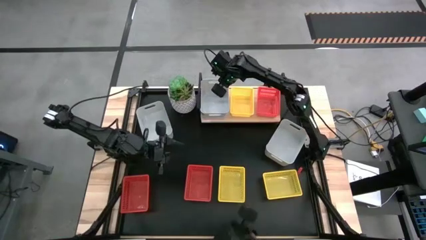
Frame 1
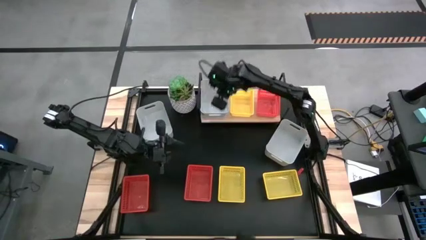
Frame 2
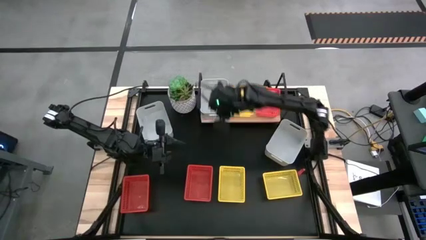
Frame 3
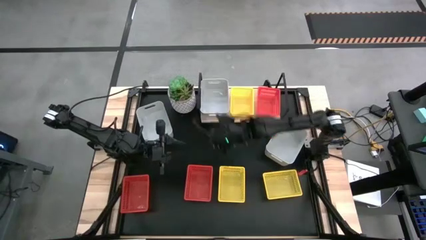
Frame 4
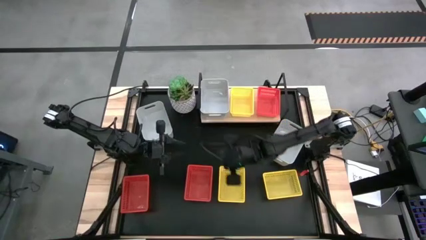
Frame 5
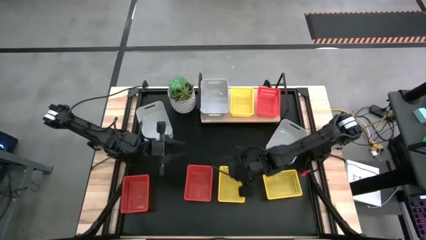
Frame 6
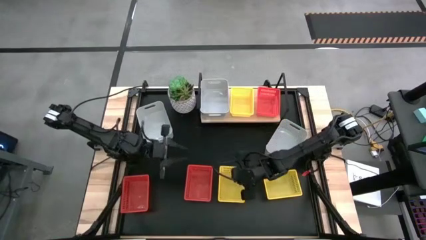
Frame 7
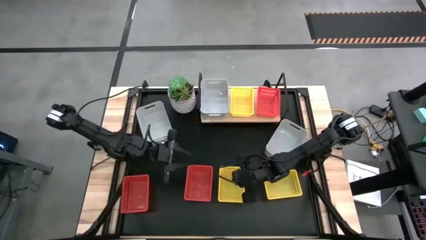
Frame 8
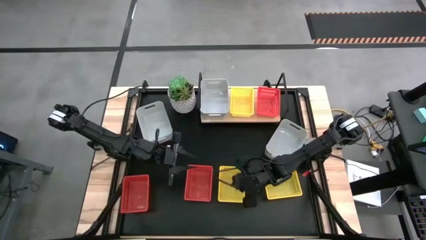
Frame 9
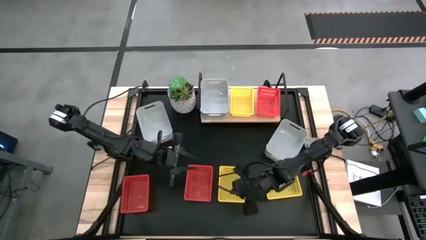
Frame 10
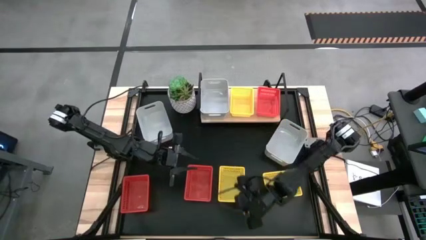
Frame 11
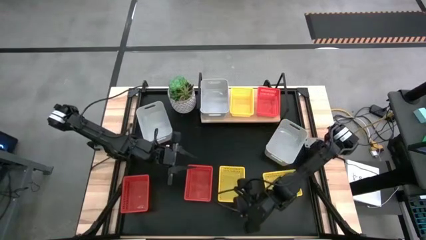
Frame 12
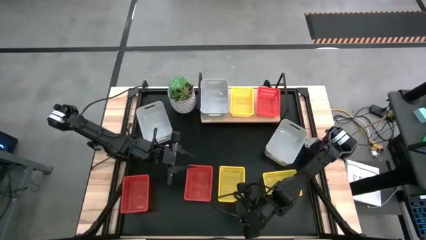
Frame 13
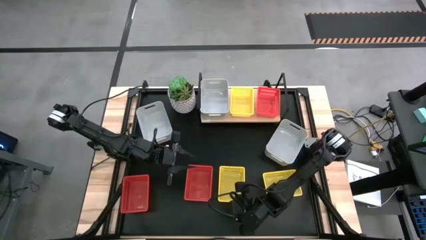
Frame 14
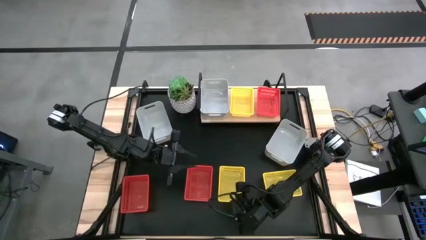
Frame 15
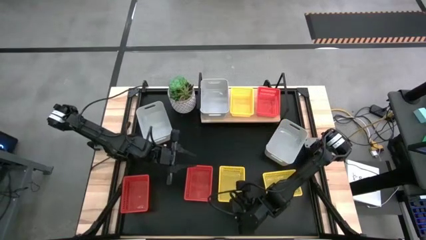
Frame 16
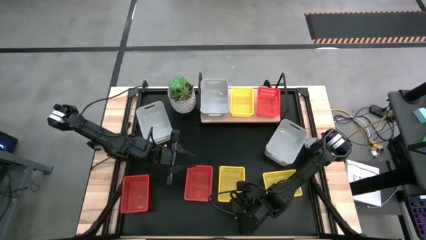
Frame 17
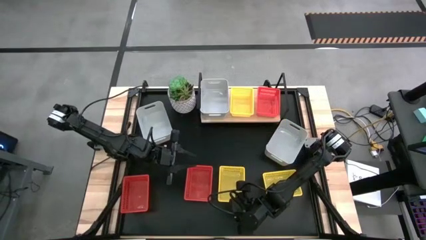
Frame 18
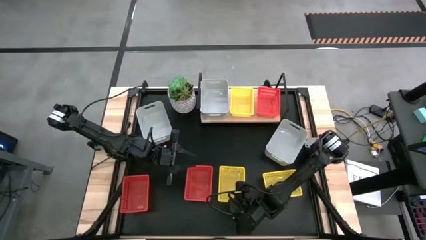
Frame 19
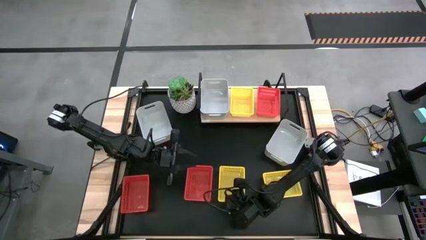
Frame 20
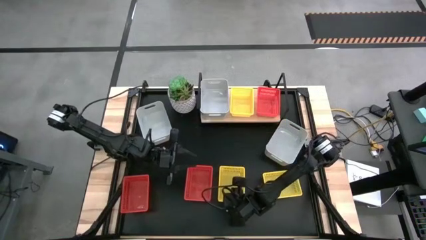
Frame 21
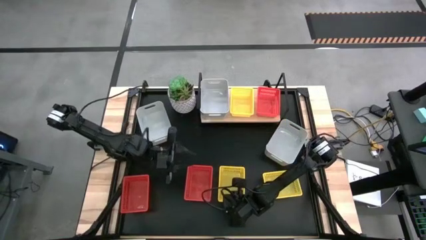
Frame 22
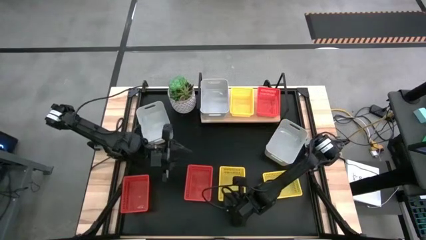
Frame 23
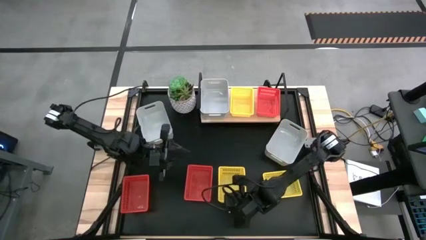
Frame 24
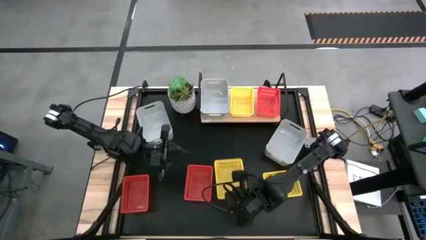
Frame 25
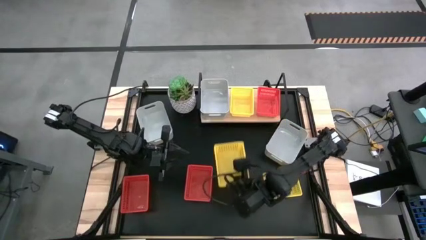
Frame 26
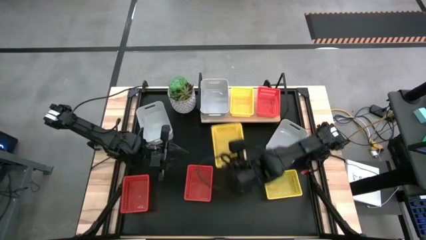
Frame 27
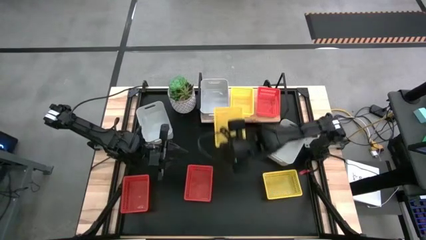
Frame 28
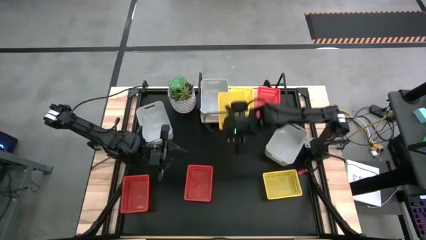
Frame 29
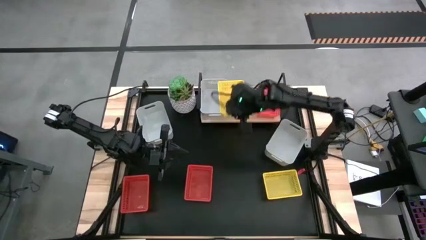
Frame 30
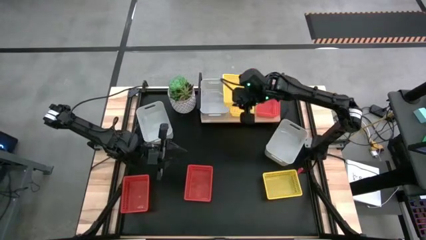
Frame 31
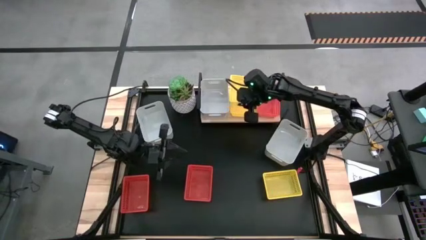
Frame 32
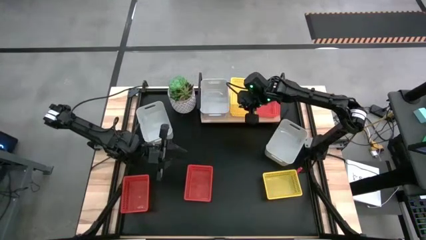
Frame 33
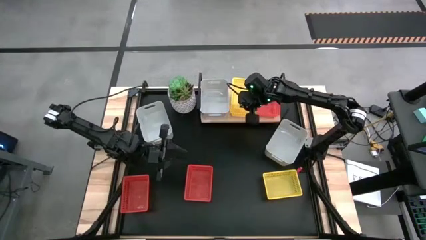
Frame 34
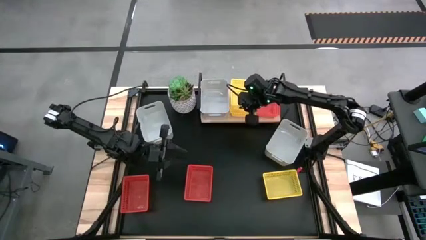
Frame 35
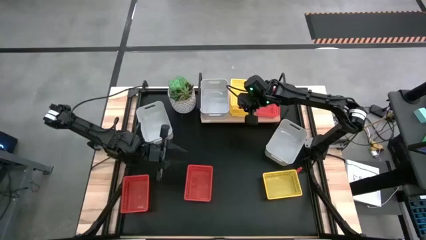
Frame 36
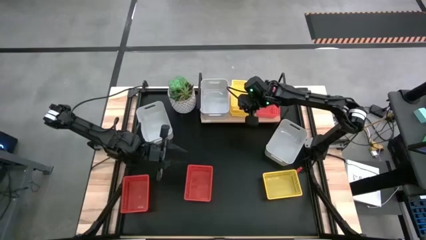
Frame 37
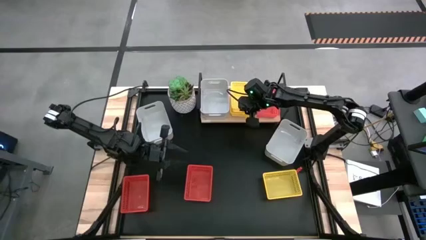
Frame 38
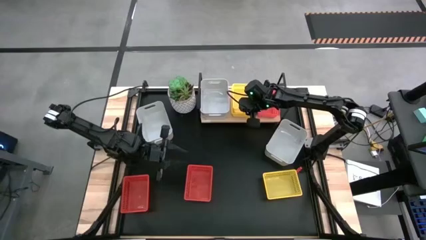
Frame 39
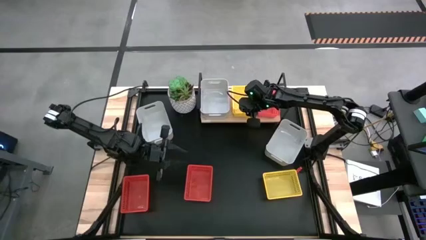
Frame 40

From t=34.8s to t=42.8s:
Task: Stack baskets on shelf by color
Stack the left yellow bin on the yellow bin on the shelf

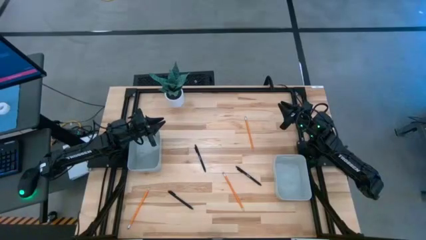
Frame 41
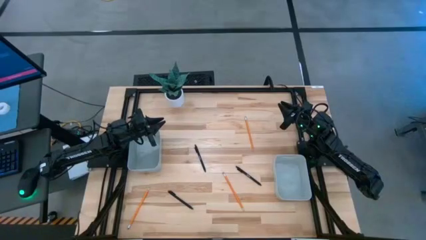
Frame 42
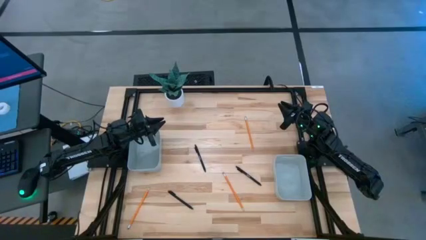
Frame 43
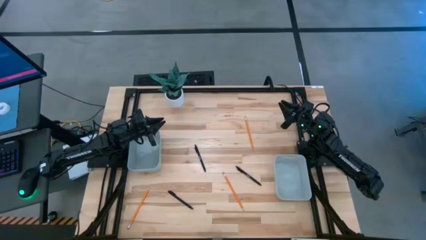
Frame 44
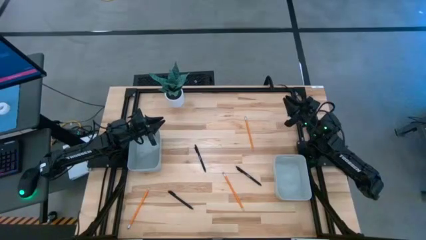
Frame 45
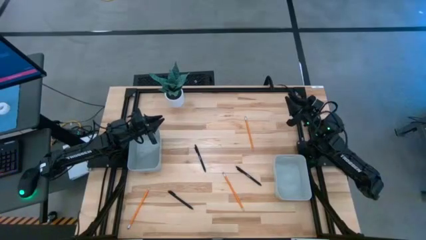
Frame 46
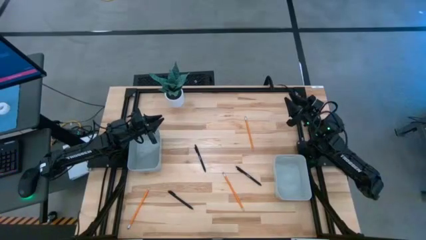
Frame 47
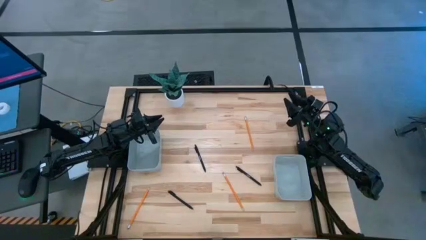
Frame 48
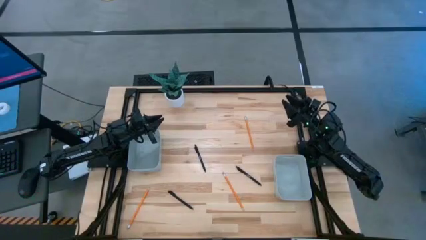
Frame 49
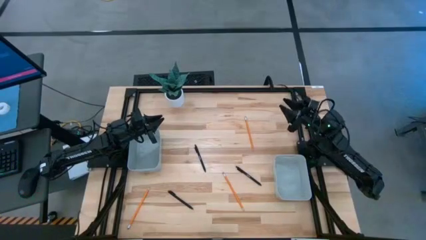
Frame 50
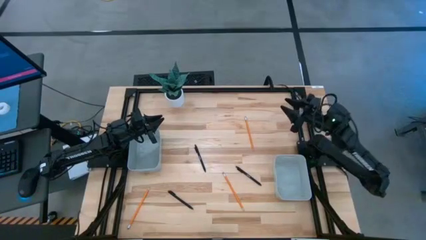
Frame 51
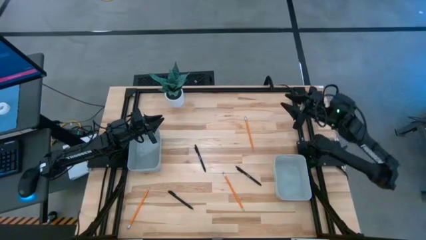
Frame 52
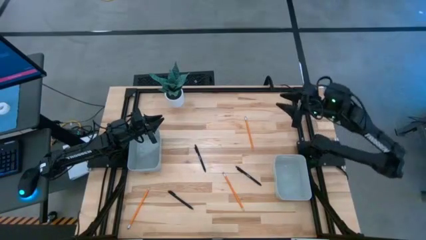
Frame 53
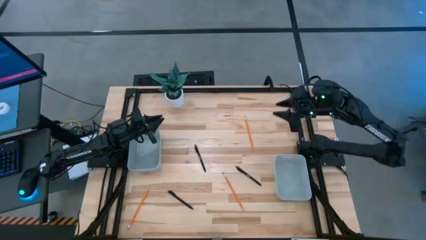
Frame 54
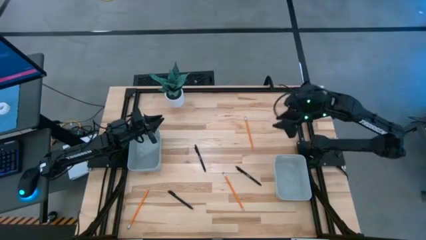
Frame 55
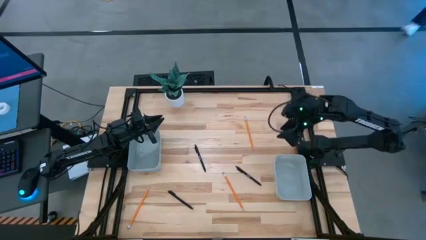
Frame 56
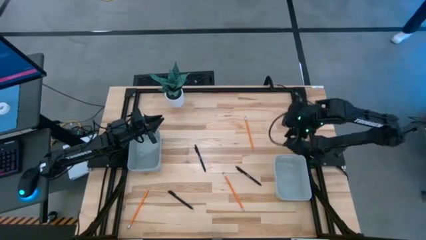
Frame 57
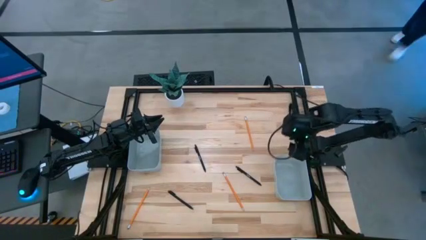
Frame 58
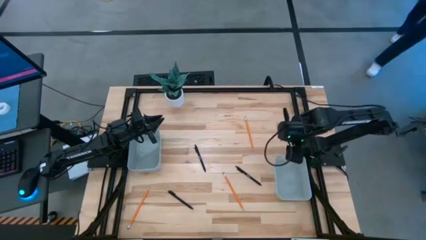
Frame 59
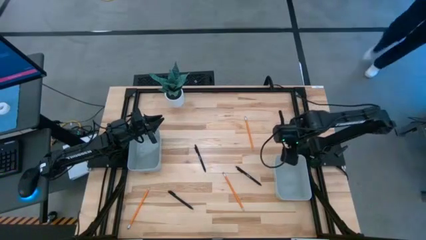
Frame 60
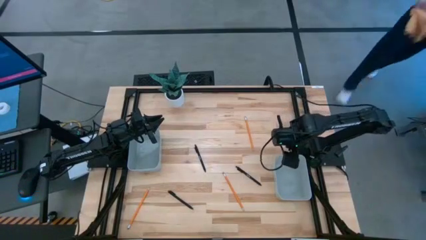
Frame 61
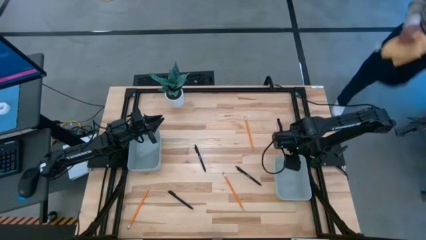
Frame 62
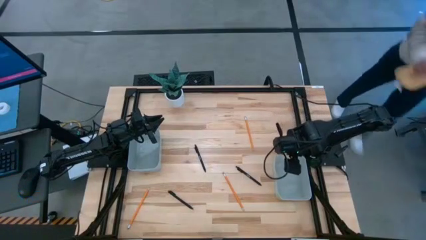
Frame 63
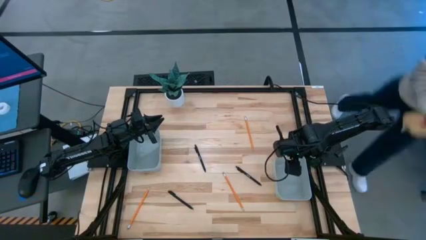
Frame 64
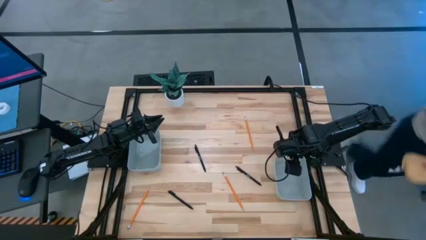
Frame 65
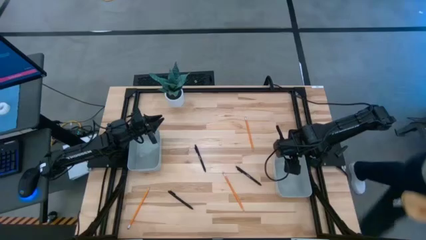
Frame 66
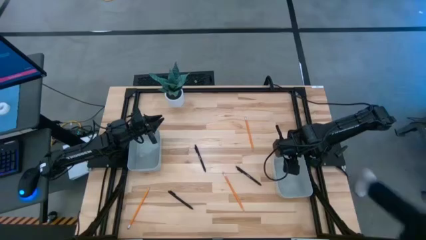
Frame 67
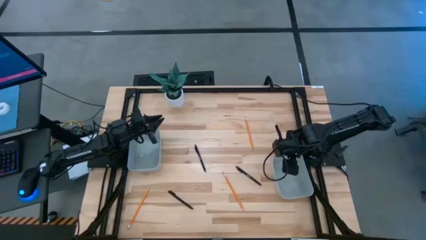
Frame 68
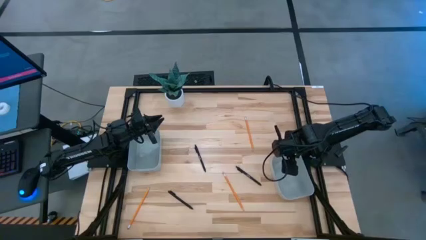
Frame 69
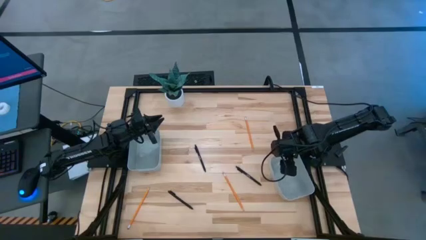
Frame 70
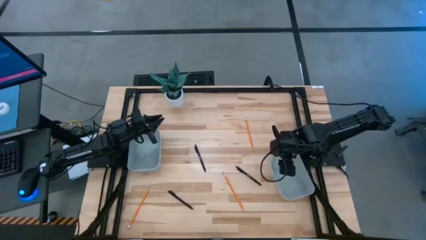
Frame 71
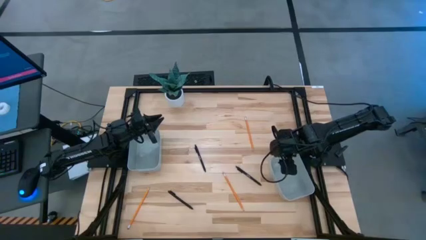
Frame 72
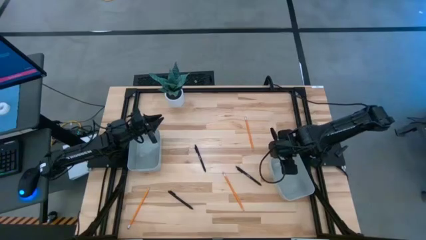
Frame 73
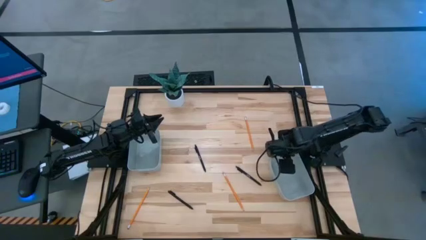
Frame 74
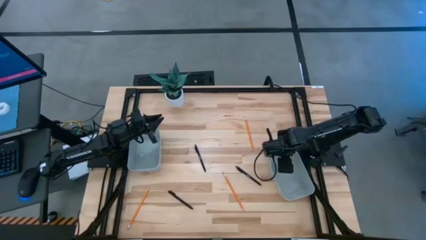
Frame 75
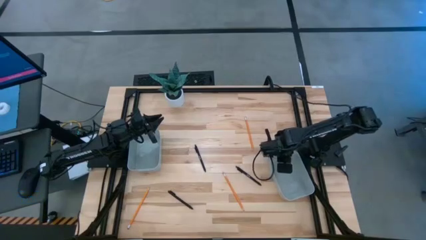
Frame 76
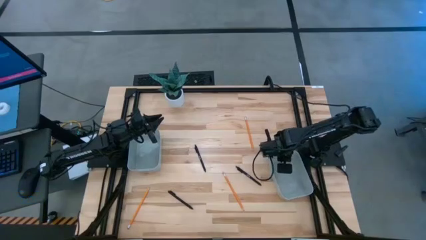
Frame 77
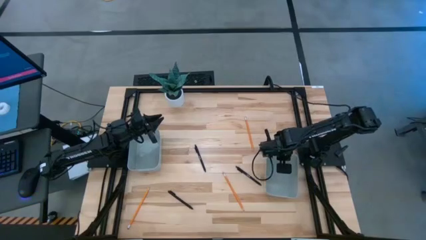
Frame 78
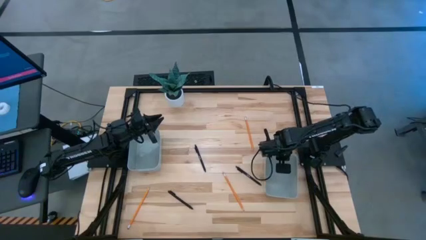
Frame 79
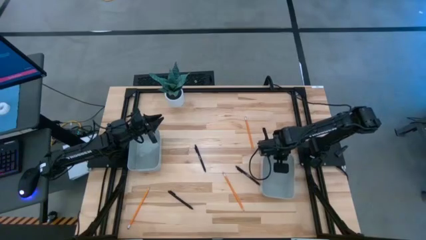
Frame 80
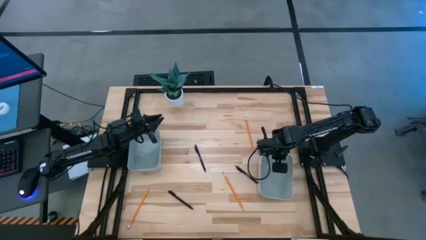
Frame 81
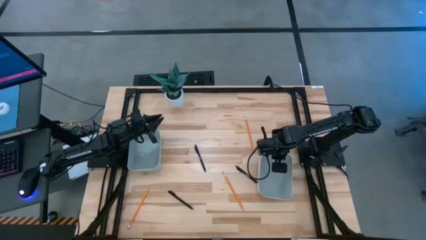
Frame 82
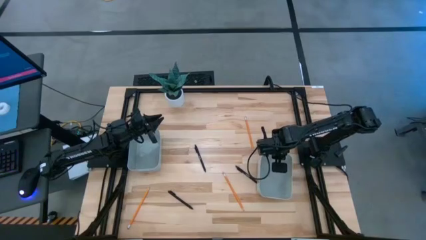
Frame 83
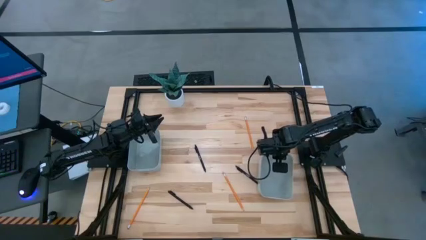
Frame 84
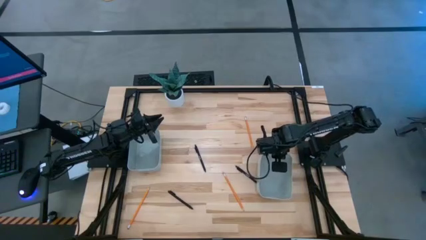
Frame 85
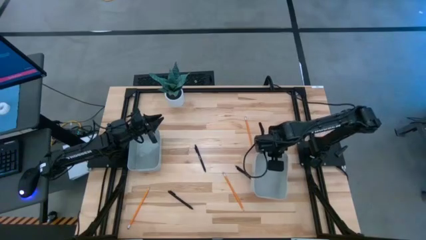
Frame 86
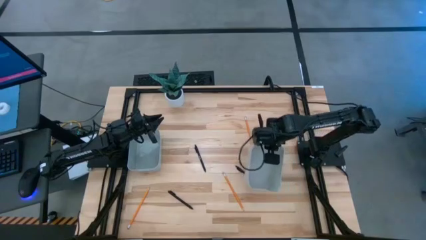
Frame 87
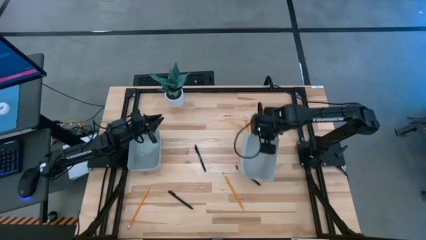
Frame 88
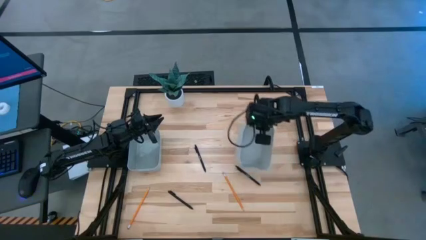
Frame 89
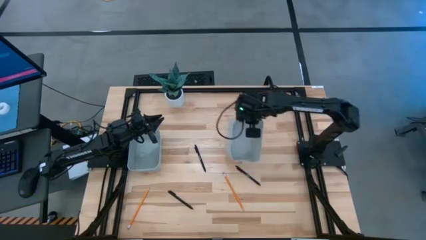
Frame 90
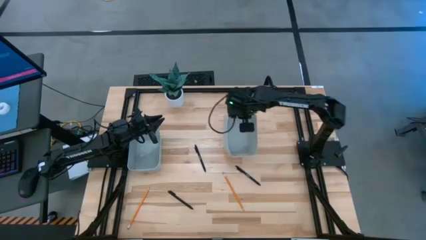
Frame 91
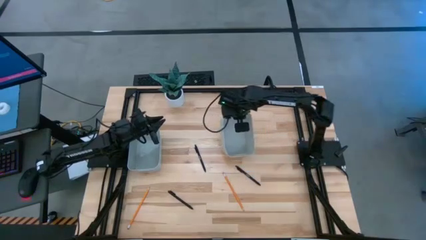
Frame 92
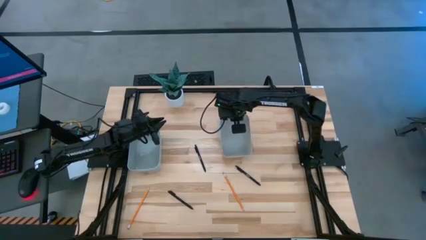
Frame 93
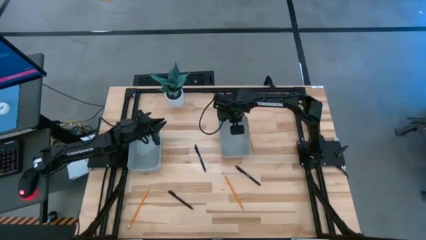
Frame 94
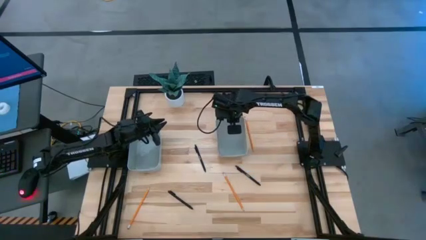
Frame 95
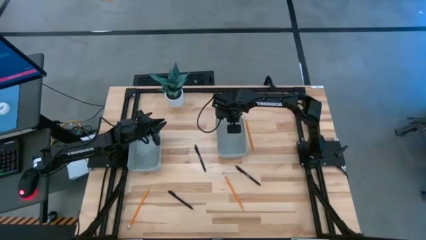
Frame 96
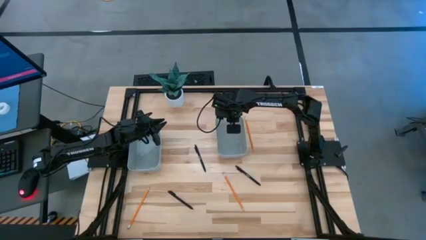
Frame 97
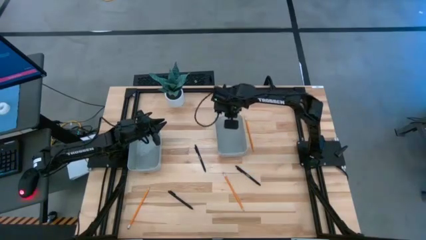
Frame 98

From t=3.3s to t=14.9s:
Task: Sort pens & pencils
Move the right gray bin to the middle of the table
